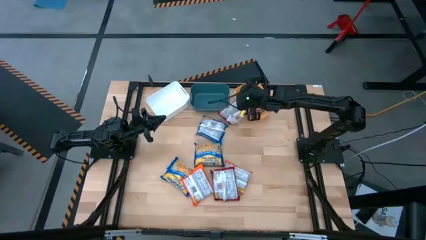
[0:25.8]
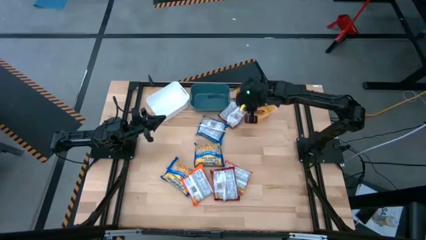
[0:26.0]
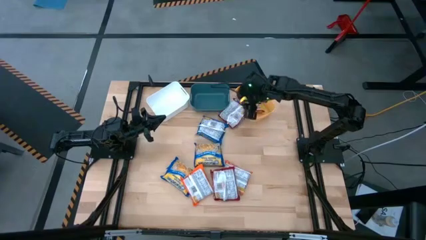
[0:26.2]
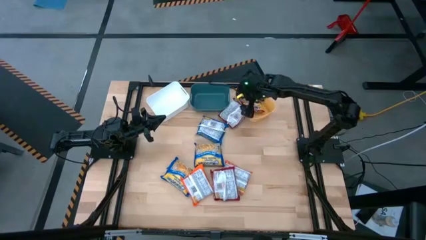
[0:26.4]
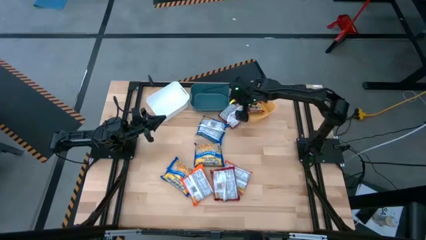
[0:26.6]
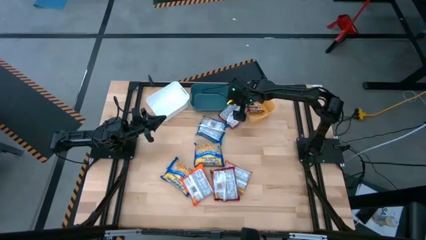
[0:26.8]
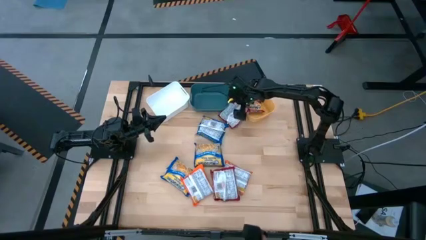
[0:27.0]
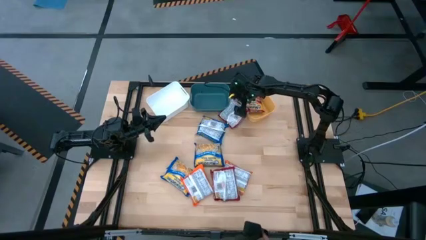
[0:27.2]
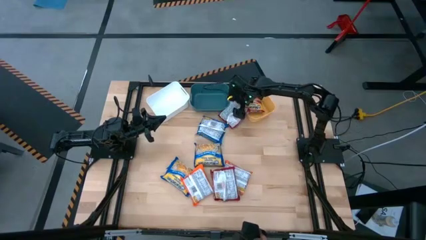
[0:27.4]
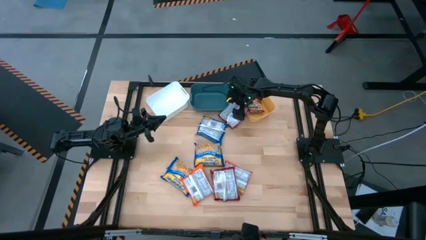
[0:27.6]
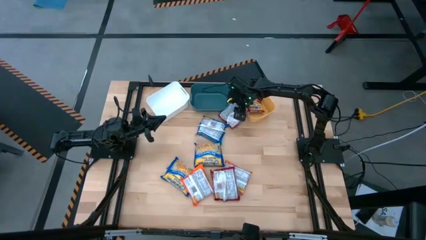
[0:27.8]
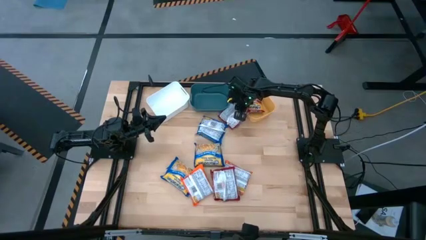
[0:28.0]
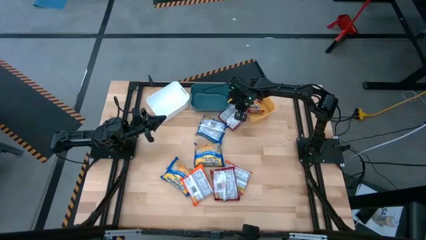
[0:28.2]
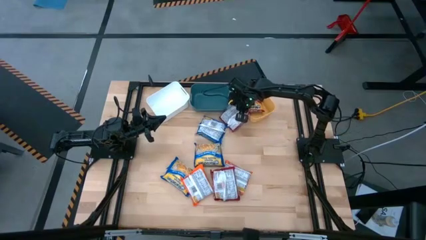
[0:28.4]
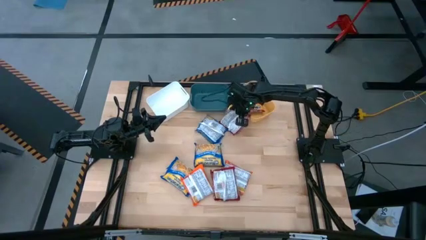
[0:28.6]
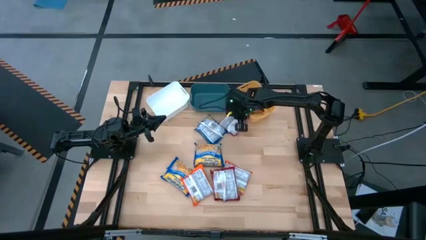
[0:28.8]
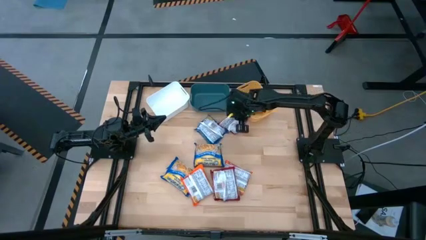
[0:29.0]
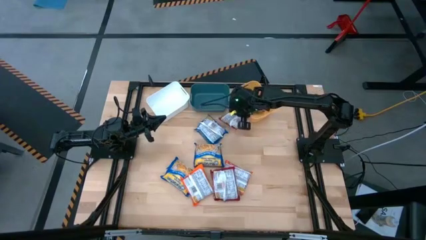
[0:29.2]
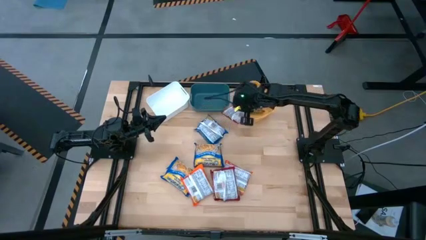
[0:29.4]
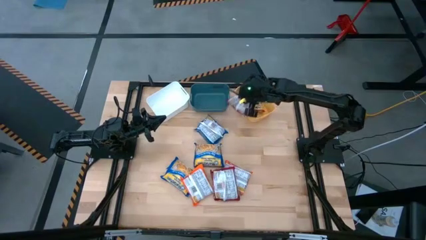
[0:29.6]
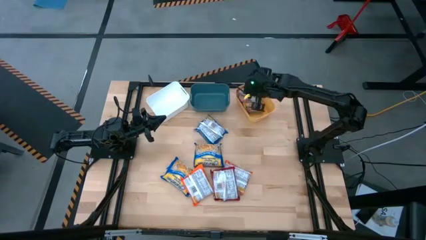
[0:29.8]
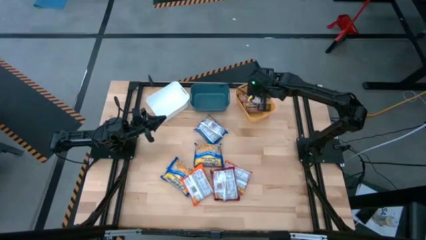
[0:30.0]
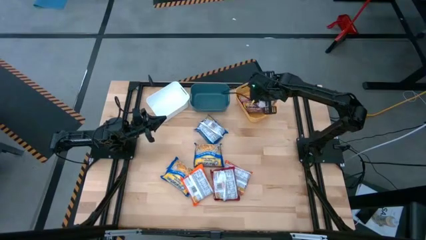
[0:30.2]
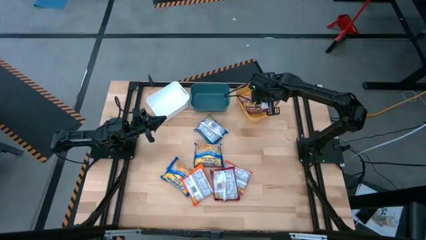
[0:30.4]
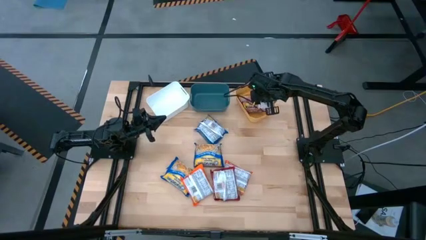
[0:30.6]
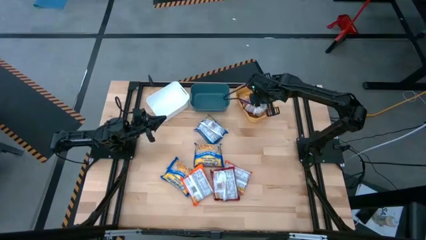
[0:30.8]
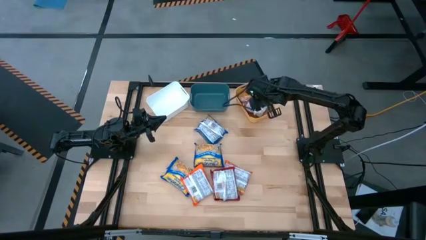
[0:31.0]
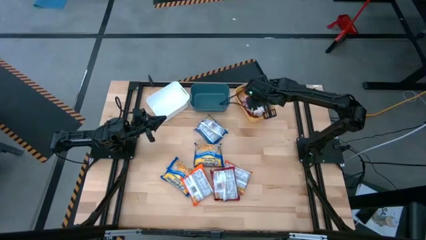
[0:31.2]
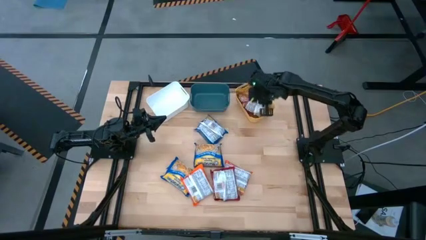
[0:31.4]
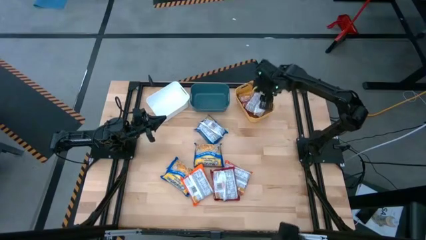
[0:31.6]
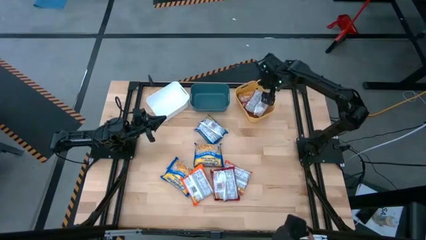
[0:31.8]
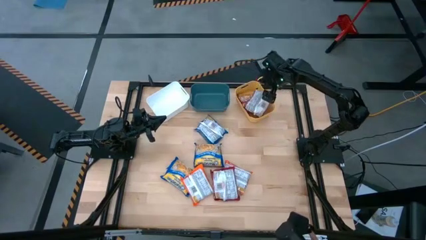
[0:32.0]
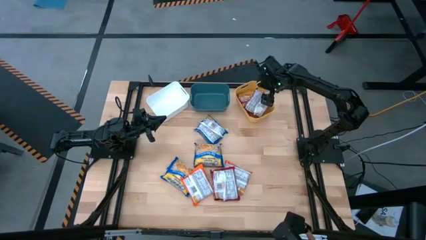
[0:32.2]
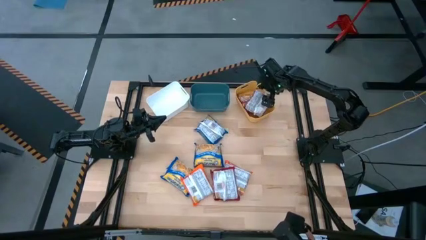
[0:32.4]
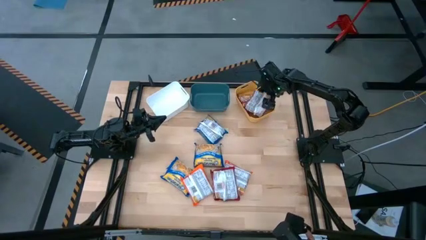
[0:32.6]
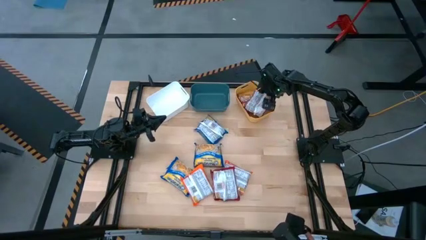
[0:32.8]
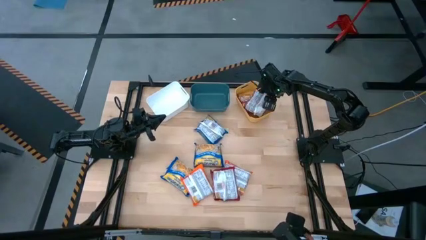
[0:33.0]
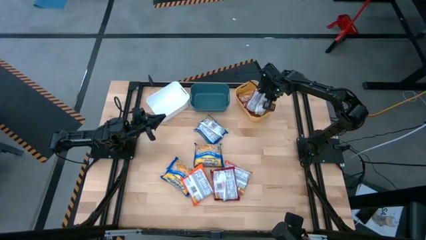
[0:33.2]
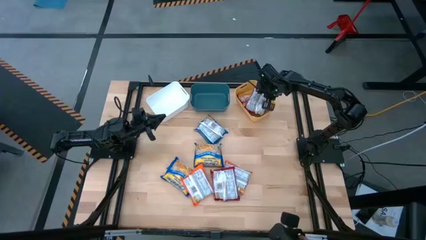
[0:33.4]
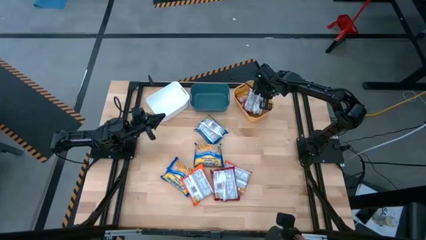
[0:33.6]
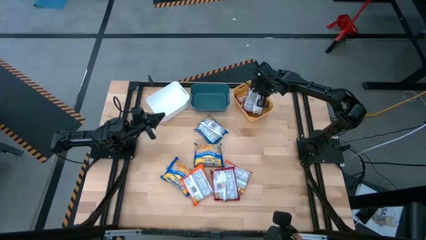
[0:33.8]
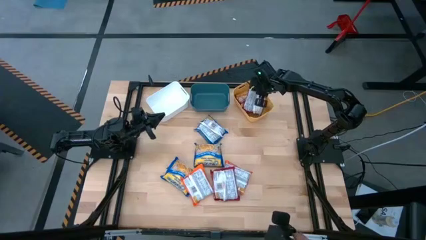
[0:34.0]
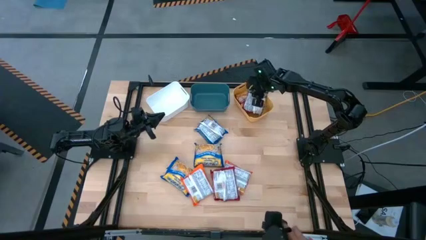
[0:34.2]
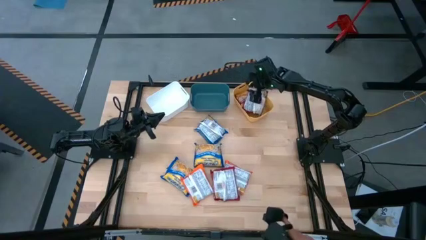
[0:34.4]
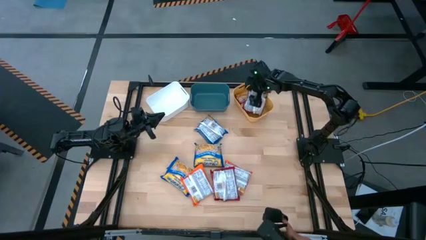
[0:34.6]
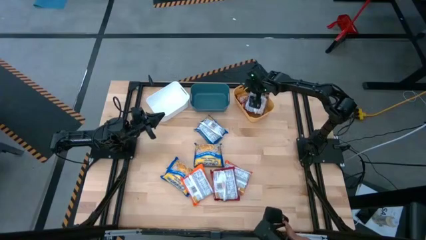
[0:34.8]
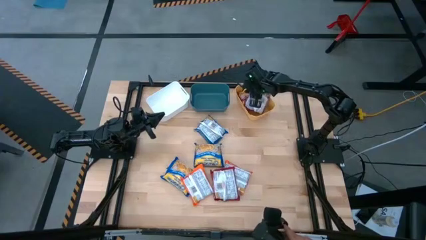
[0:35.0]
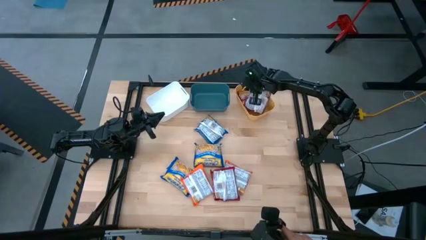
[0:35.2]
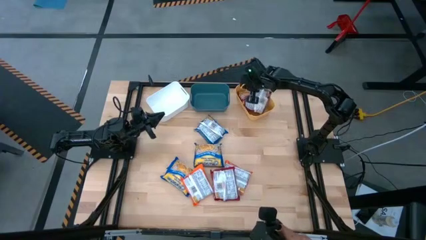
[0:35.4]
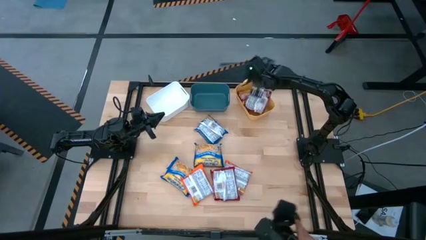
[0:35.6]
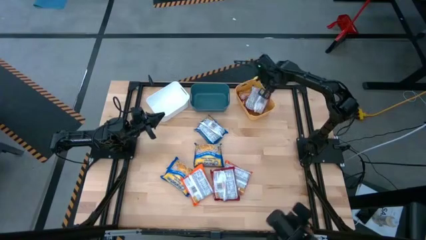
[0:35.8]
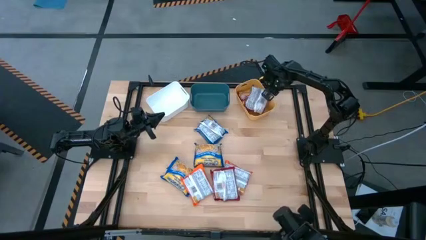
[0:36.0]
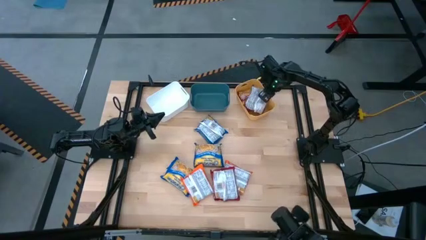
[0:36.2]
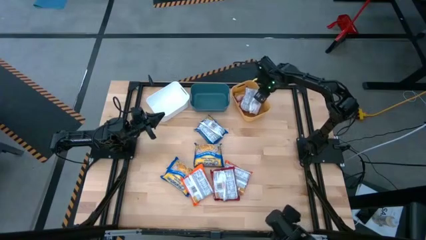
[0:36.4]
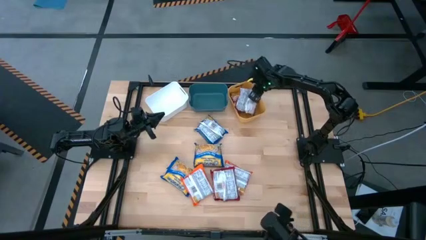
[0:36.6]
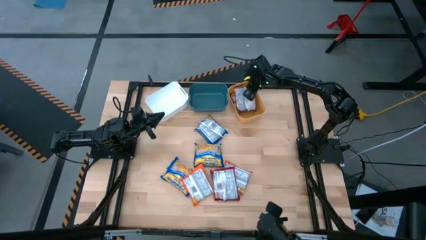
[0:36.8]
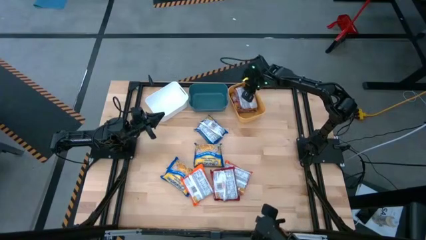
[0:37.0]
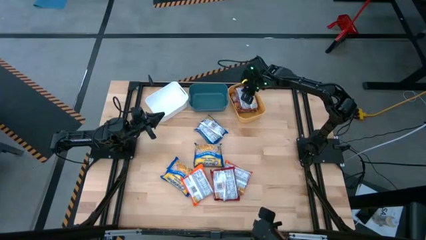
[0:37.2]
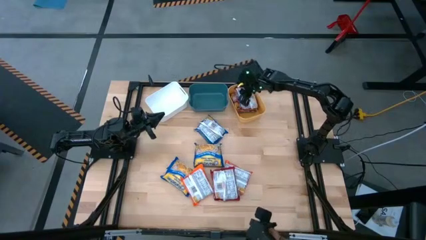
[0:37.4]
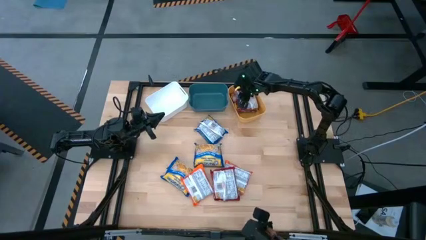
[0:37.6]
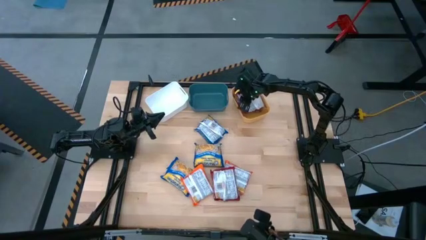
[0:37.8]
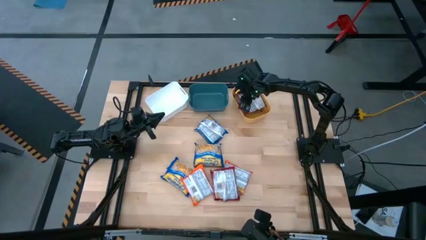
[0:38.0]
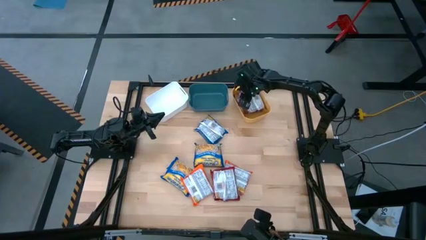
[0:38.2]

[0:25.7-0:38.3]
Task: Sort Maruchan noodles
Put the top red noodle pack into the yellow bin

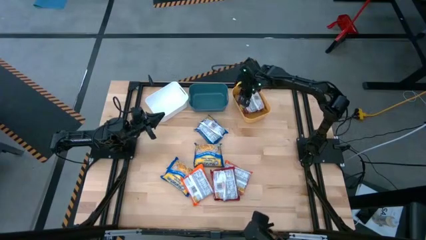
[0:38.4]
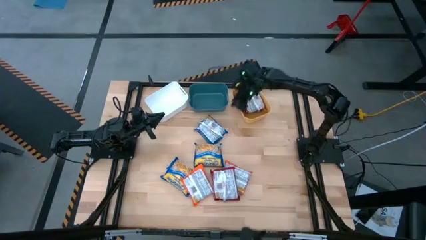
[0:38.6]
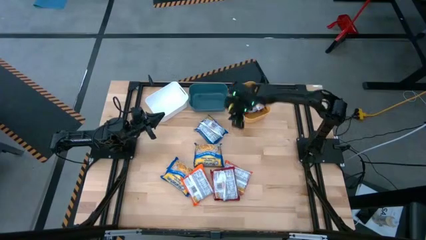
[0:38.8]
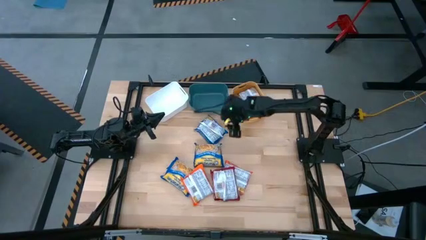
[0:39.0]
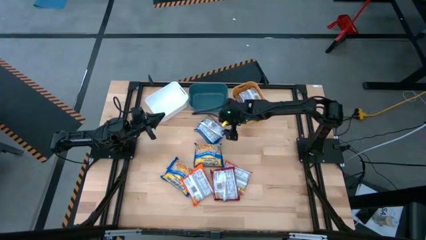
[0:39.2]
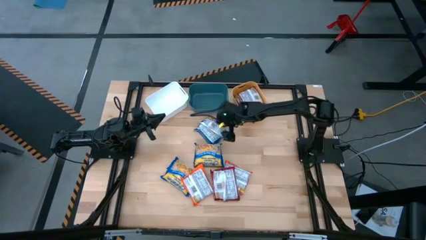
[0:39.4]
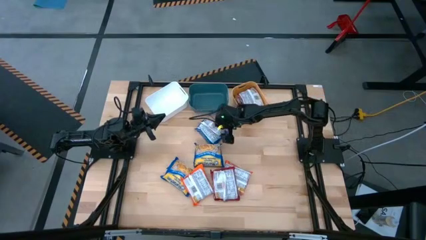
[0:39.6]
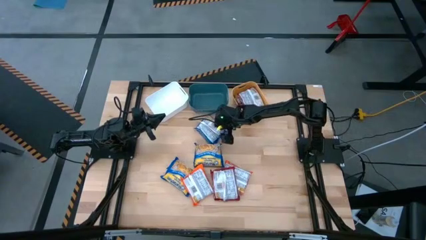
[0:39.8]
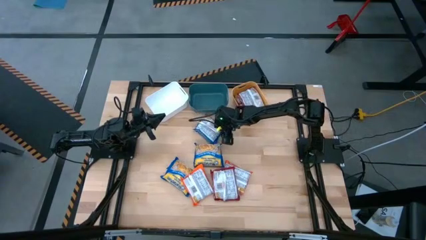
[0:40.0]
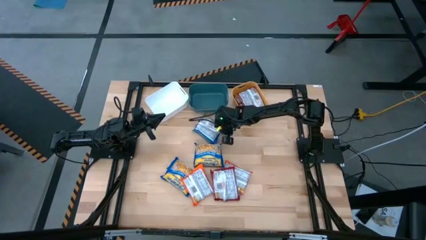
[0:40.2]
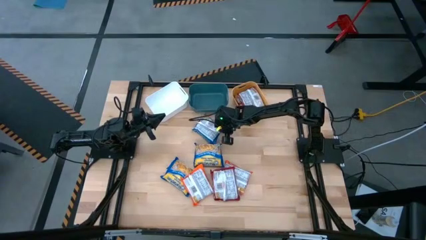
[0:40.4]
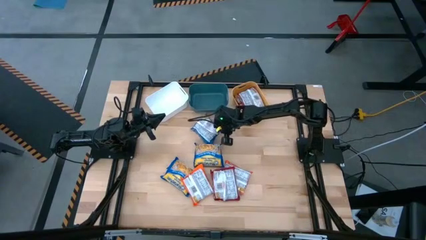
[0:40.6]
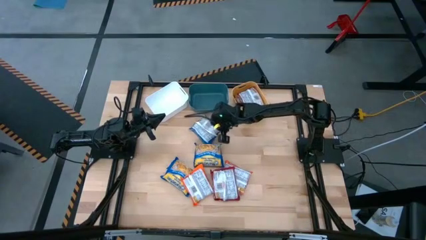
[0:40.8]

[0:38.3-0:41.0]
Put the top blue noodle pack into the blue bin
